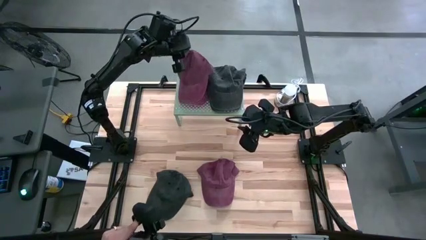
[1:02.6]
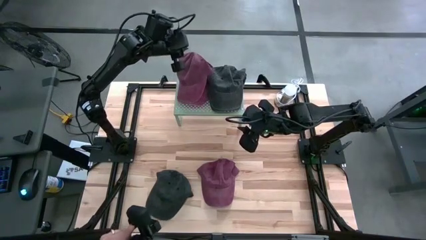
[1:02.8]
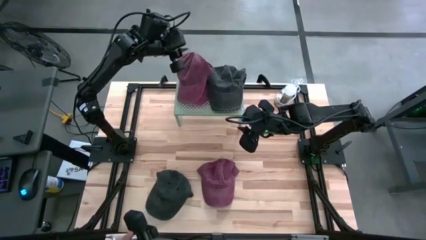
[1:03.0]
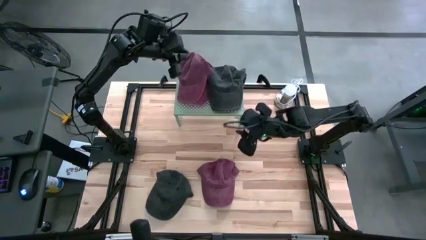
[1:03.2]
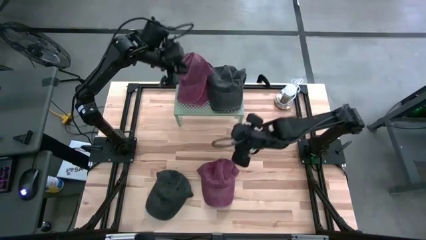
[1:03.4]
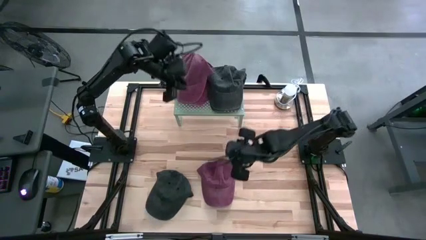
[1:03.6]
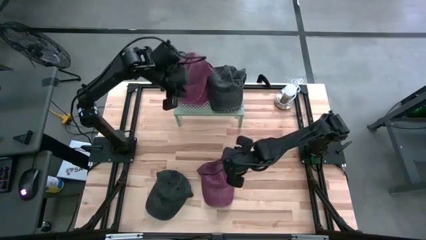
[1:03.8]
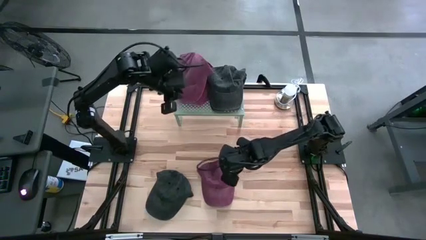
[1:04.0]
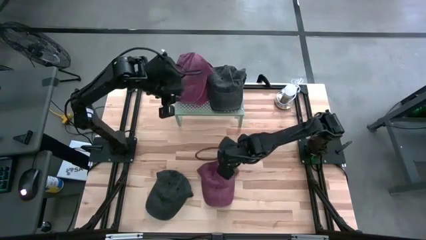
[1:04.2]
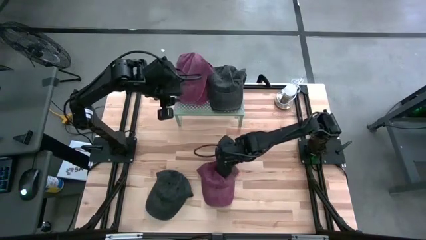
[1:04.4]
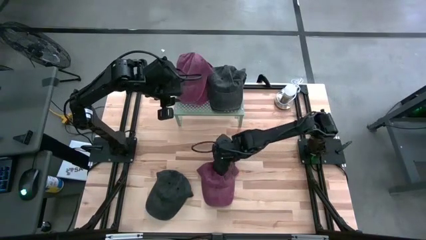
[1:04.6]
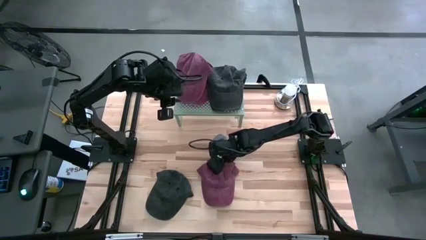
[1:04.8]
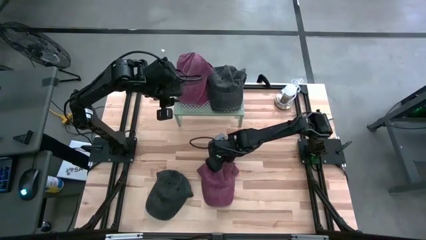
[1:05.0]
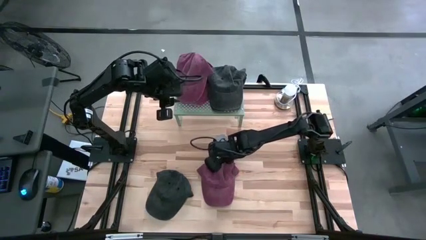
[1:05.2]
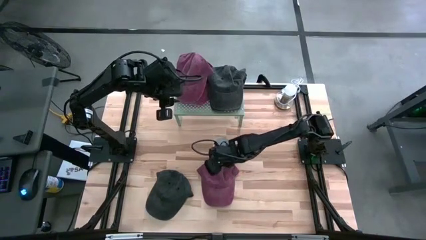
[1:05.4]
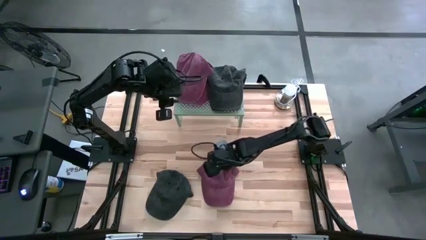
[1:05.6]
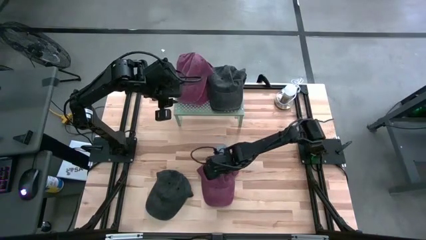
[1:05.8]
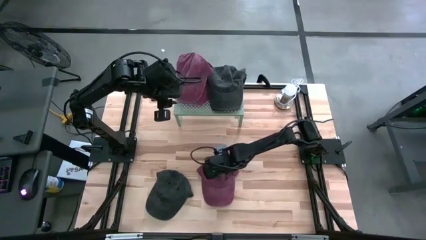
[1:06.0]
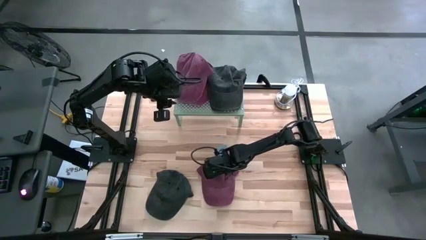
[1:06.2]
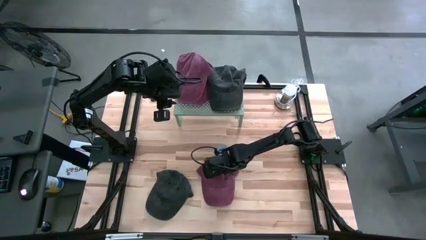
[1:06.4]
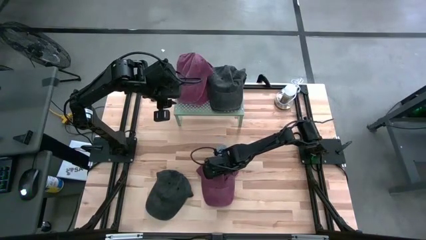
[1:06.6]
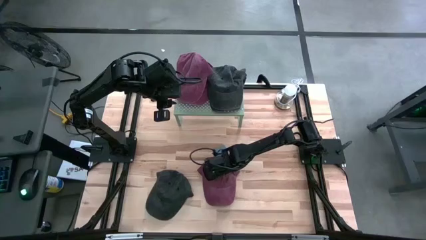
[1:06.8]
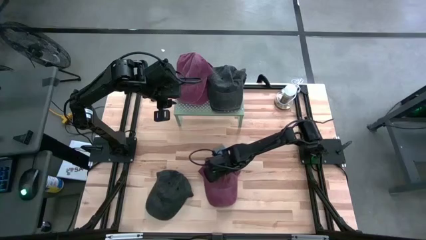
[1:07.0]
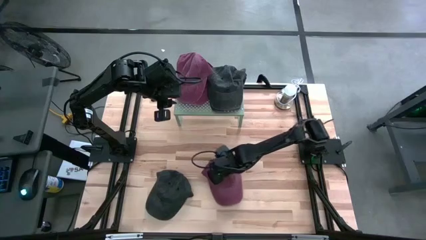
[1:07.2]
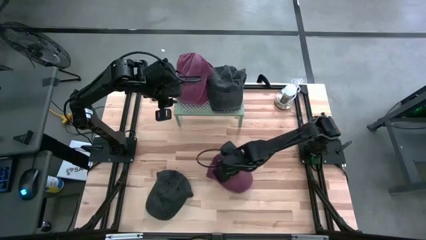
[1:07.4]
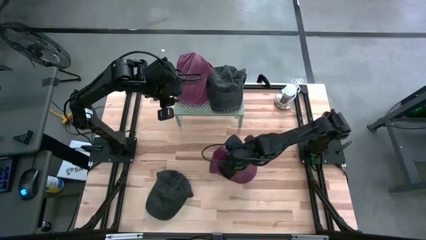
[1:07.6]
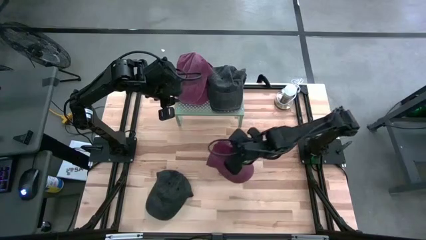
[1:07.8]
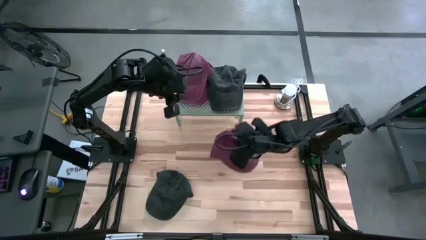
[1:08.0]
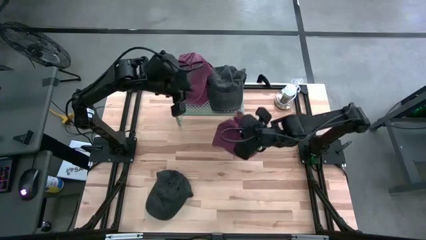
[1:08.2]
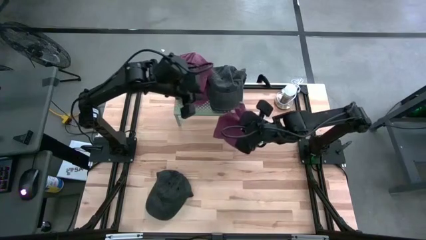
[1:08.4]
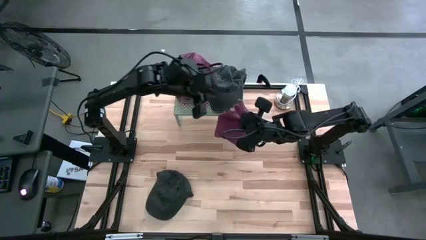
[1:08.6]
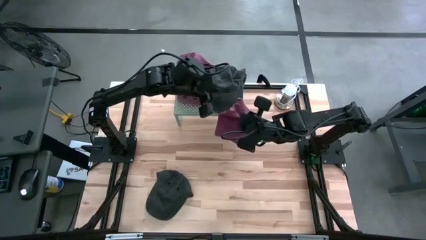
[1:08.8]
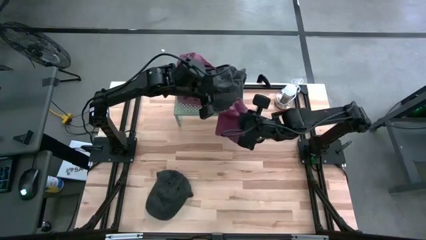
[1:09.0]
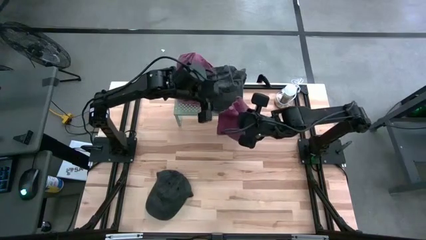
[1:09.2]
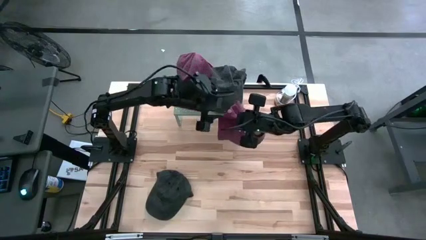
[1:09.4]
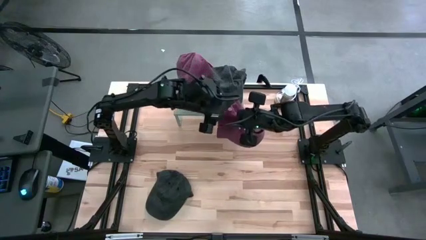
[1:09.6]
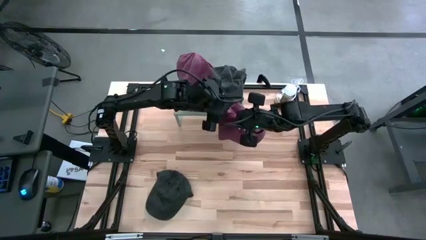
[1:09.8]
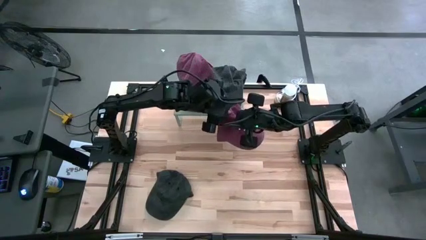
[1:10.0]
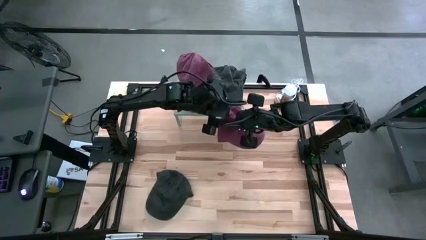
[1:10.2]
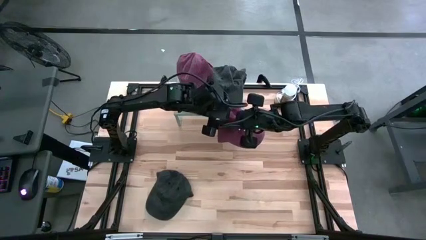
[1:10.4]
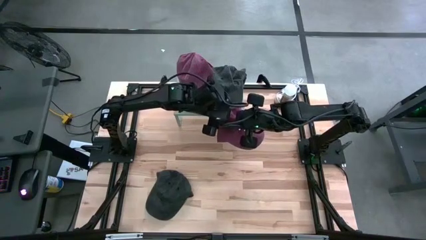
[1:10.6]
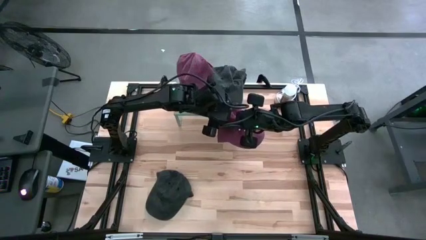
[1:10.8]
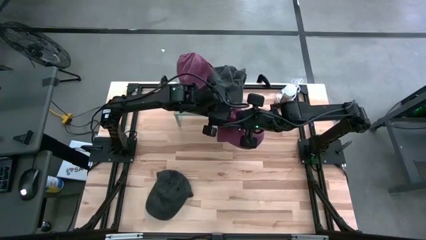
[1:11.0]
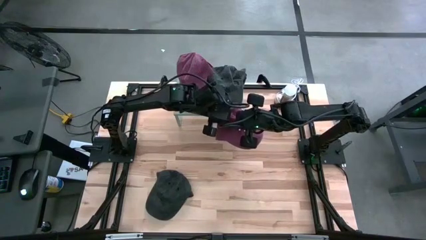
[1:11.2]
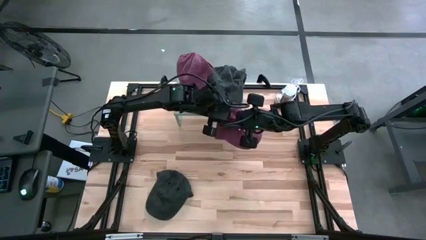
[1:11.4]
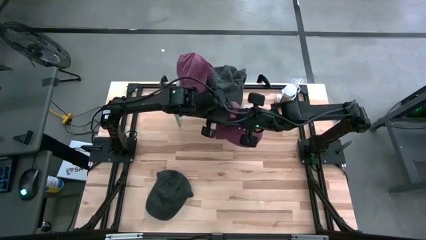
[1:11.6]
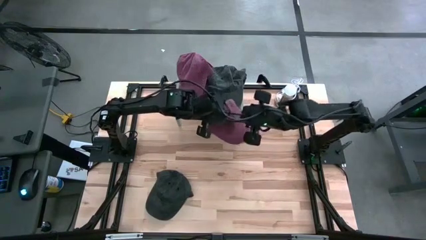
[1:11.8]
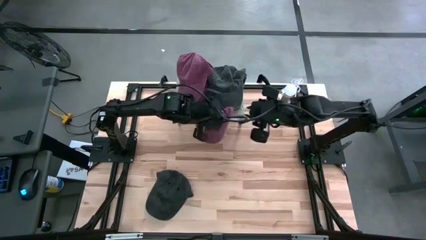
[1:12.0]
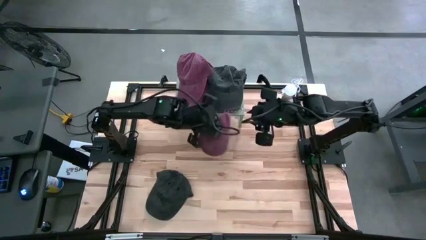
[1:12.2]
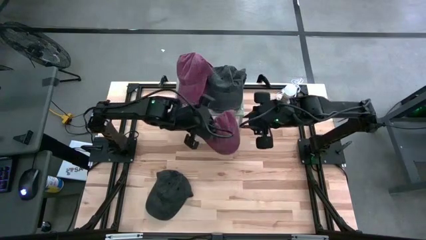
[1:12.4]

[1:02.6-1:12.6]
Task: Pick & Place hat
Stack the red caps on top of the red cap on the shelf

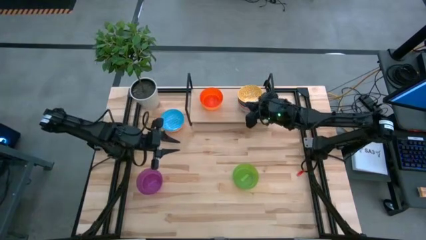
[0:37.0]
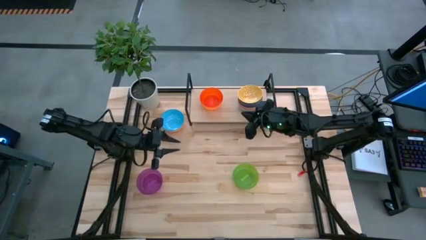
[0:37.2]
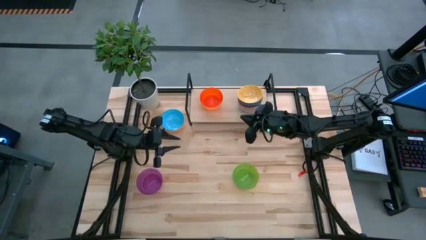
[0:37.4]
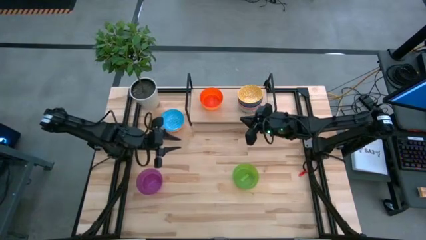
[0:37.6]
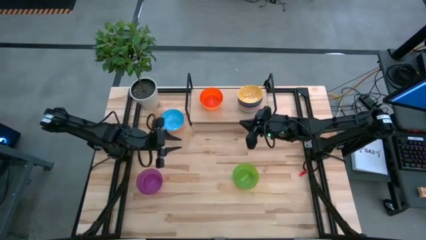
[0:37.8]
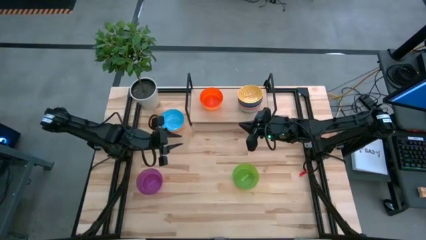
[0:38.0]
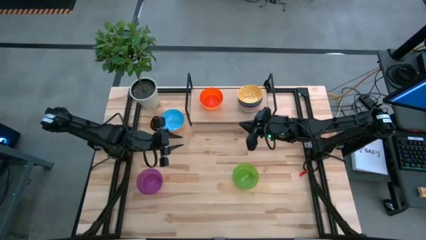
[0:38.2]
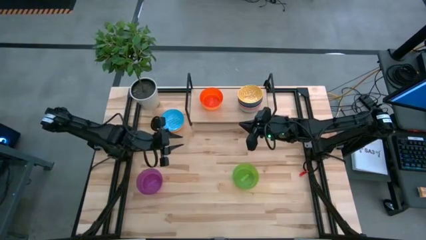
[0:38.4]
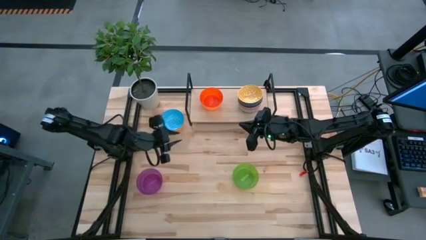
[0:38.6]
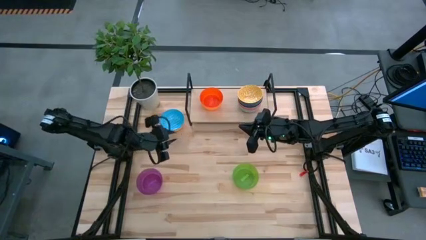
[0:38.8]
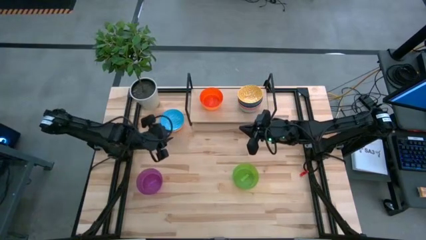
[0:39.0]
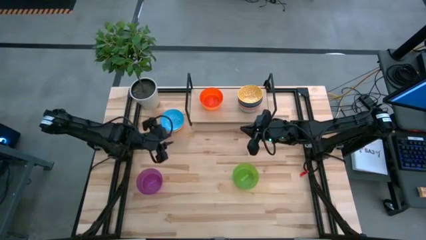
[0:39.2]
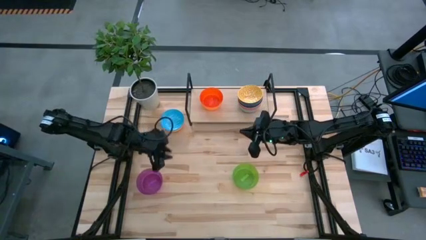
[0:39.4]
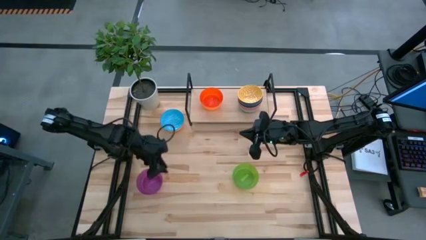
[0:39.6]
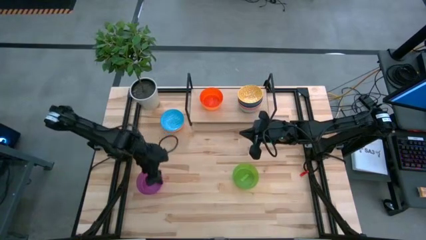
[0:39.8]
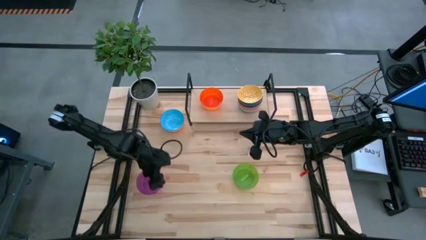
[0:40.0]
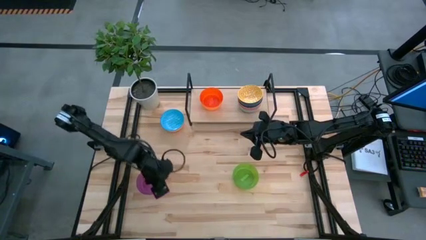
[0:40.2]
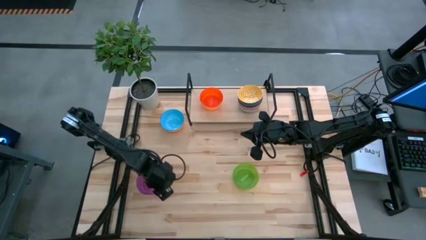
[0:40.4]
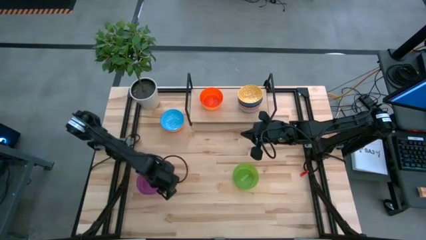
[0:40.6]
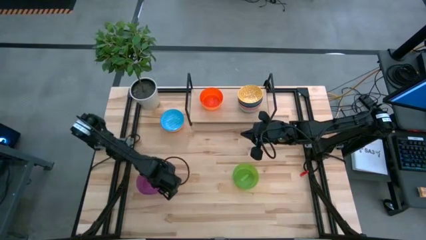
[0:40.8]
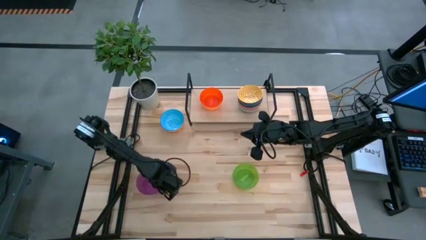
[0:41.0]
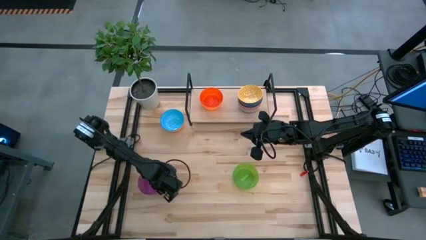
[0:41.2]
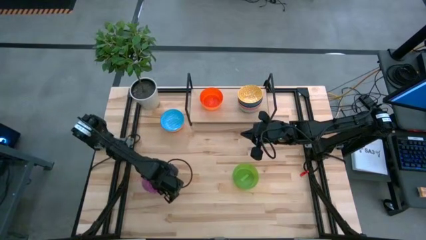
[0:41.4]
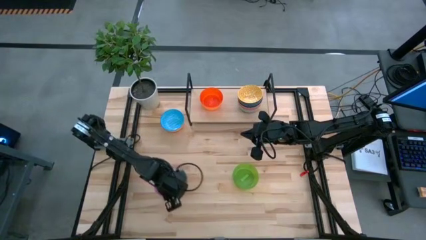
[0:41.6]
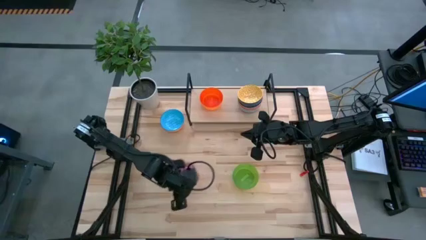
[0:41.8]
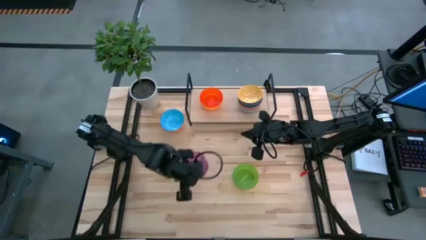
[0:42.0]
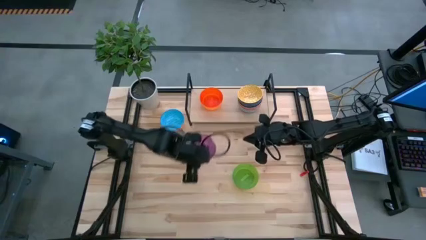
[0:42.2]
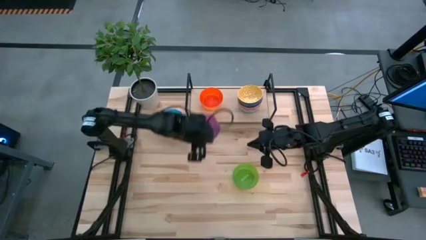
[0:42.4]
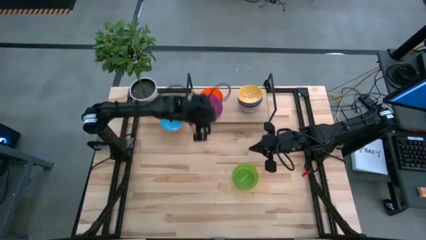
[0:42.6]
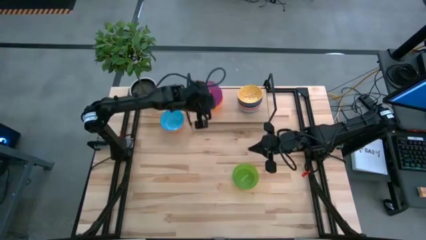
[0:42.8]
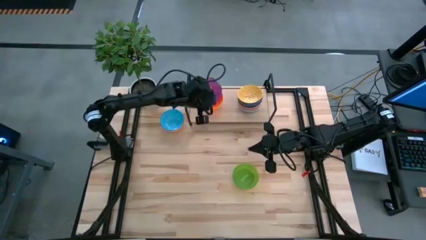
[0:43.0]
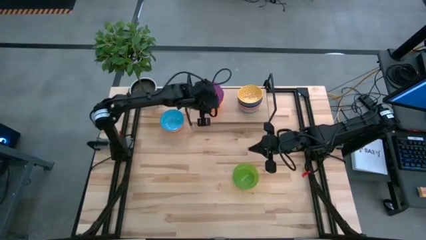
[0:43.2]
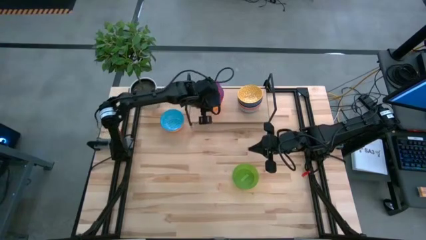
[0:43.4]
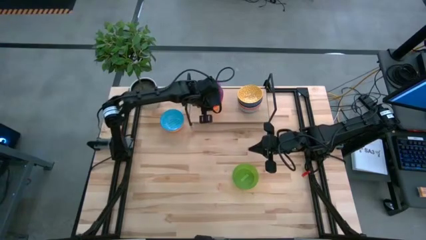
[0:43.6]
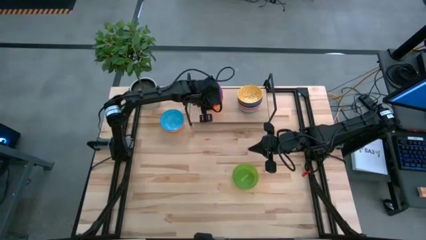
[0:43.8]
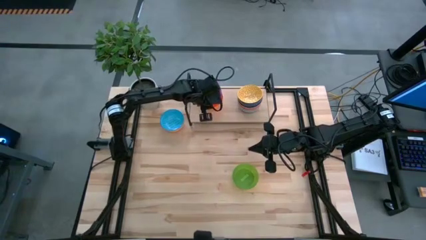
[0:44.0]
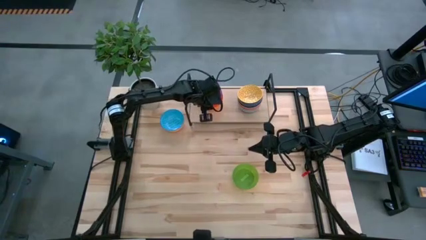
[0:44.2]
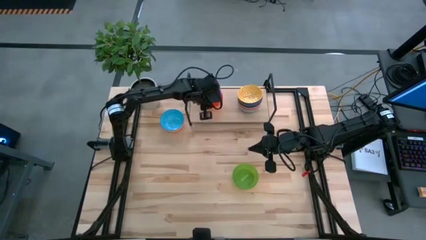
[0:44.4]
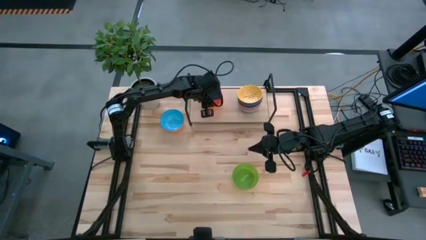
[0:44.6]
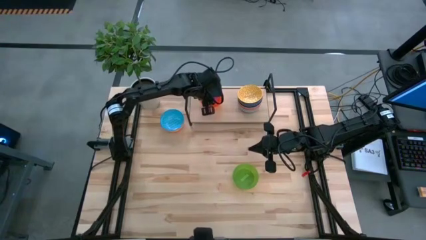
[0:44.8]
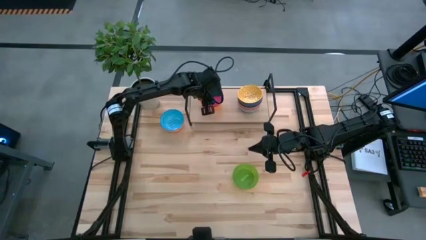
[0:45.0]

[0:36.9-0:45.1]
Task: Place and stack bowls onto a shelf
Stack the violet bowl on top of the orange bowl on the shelf
